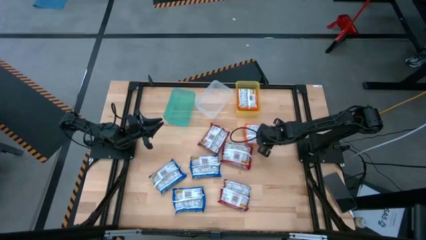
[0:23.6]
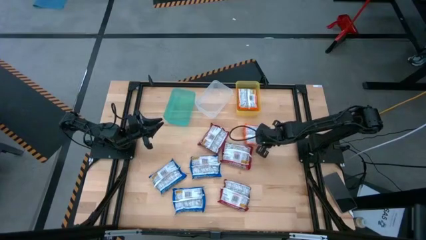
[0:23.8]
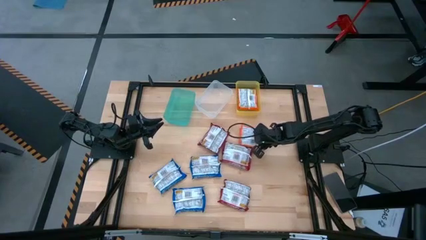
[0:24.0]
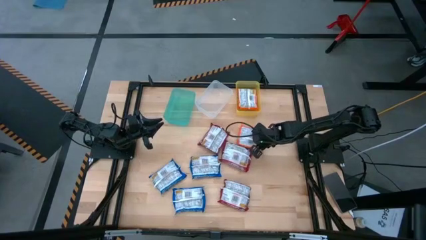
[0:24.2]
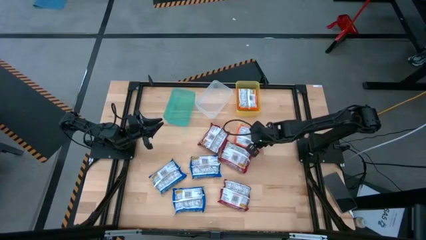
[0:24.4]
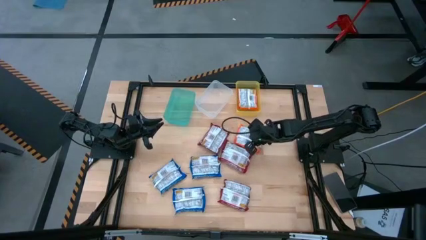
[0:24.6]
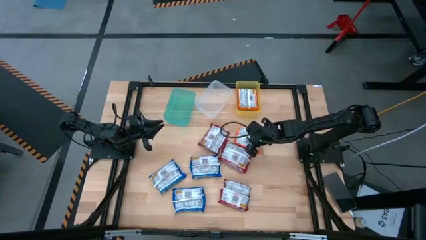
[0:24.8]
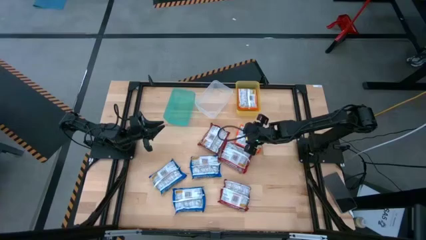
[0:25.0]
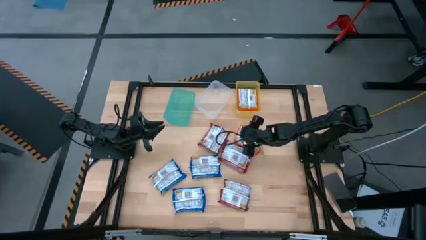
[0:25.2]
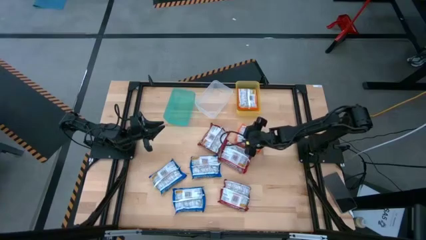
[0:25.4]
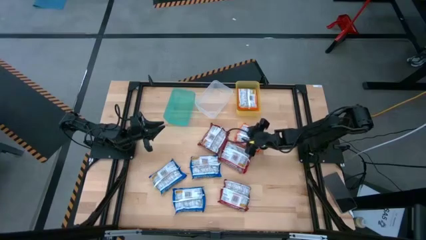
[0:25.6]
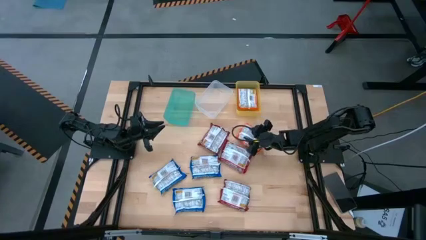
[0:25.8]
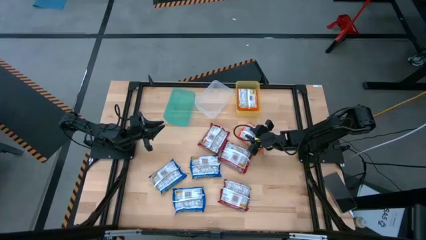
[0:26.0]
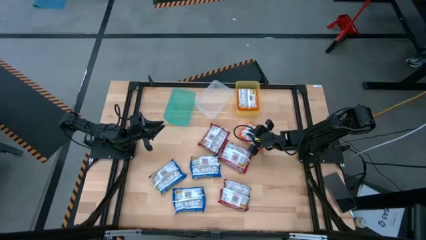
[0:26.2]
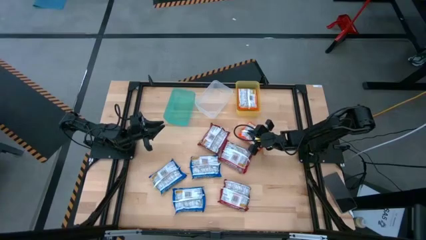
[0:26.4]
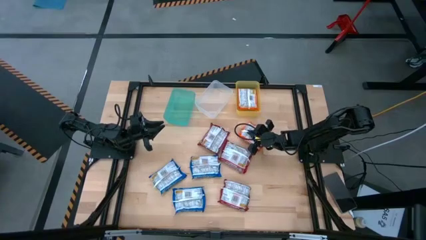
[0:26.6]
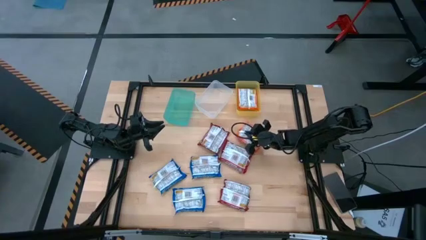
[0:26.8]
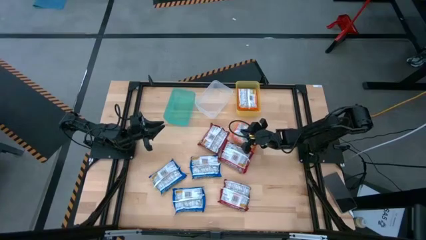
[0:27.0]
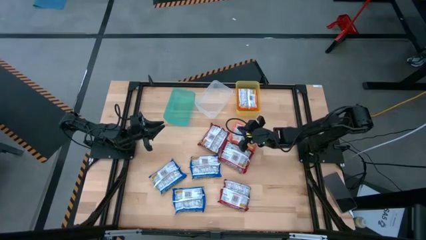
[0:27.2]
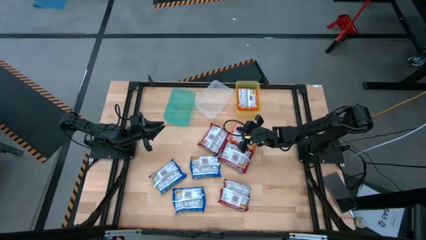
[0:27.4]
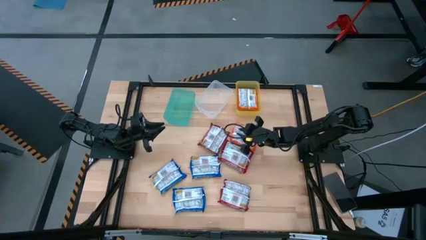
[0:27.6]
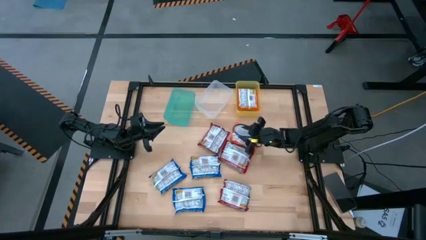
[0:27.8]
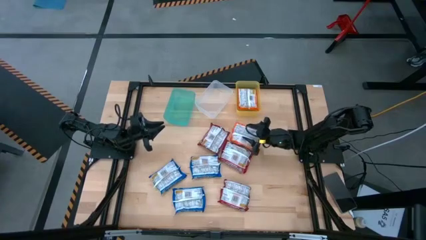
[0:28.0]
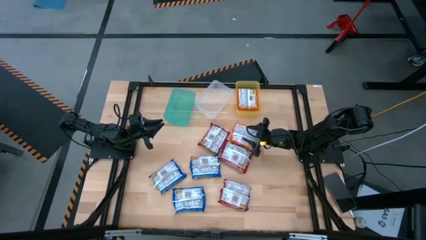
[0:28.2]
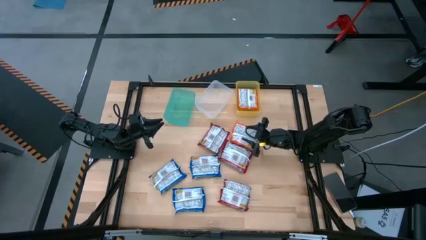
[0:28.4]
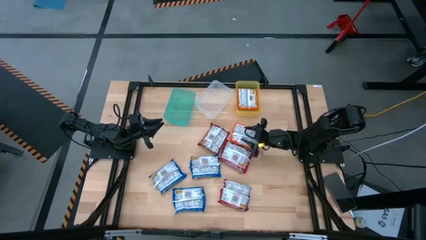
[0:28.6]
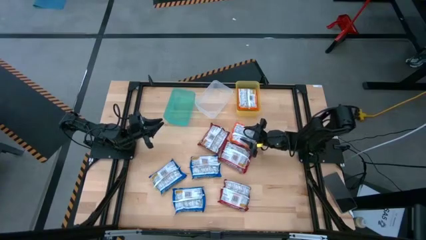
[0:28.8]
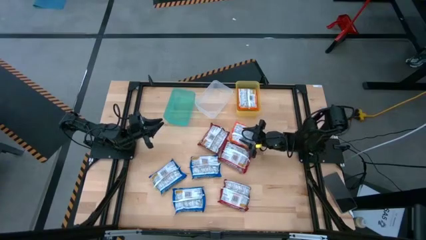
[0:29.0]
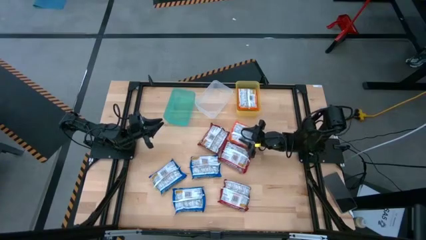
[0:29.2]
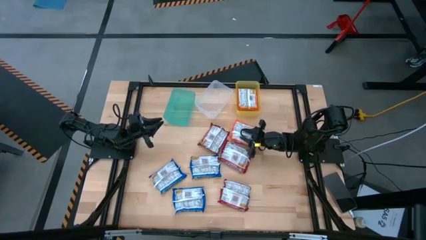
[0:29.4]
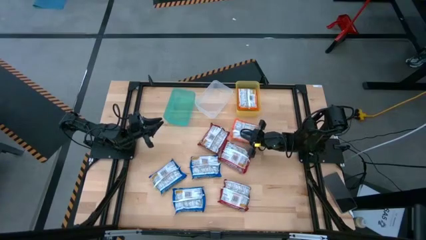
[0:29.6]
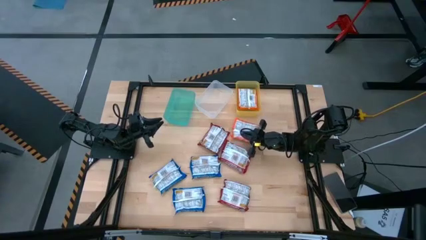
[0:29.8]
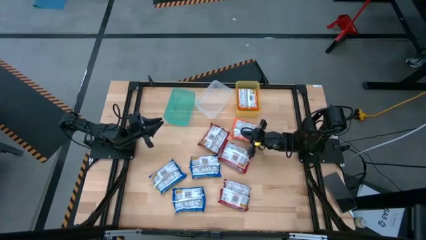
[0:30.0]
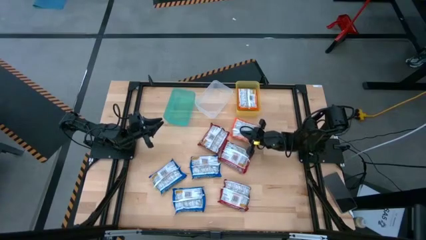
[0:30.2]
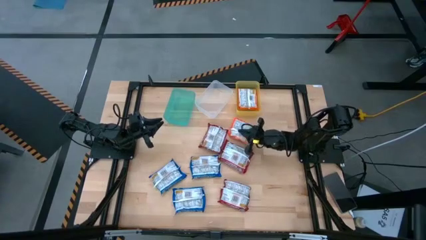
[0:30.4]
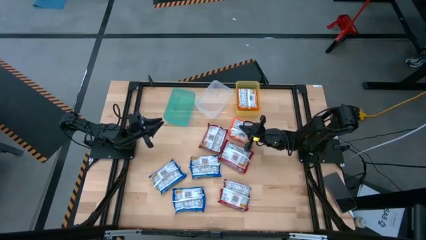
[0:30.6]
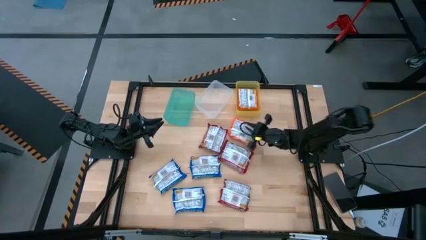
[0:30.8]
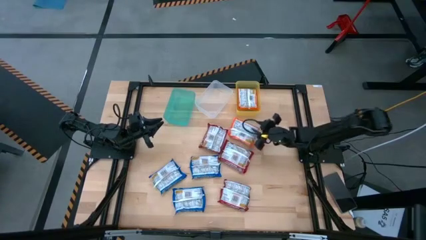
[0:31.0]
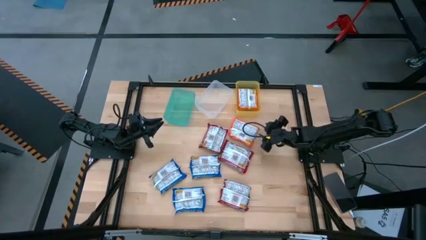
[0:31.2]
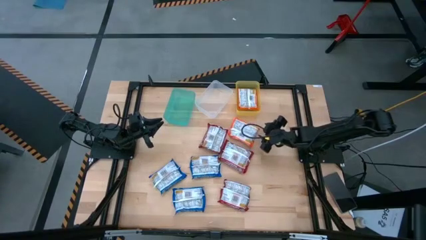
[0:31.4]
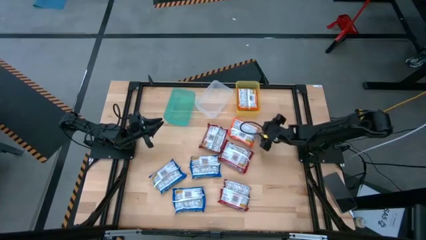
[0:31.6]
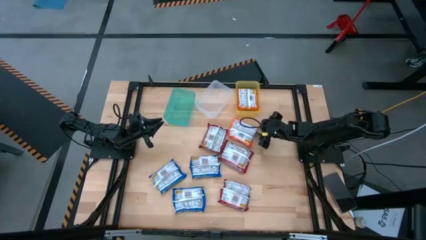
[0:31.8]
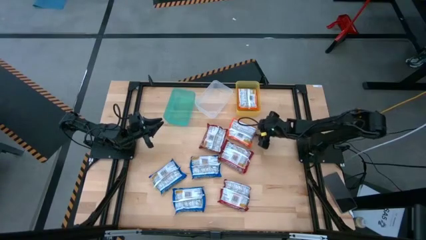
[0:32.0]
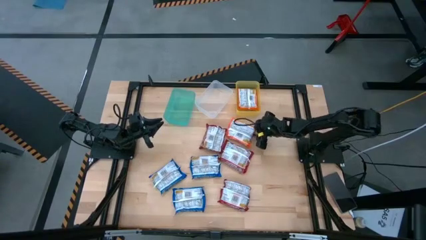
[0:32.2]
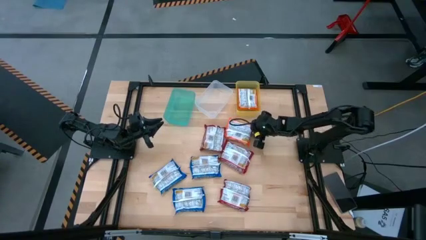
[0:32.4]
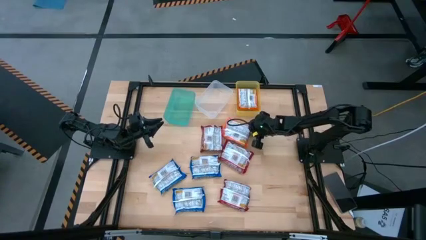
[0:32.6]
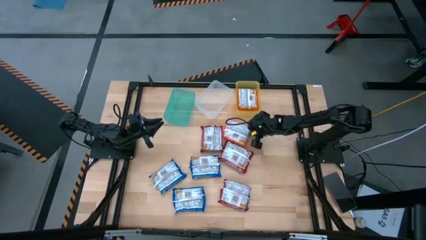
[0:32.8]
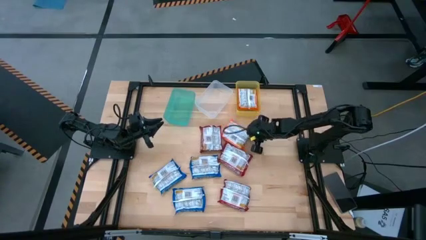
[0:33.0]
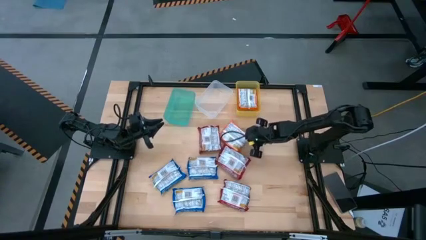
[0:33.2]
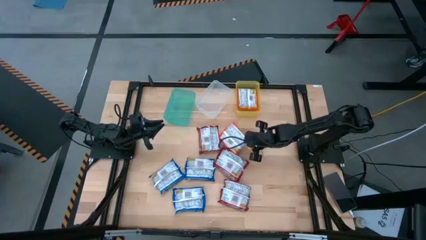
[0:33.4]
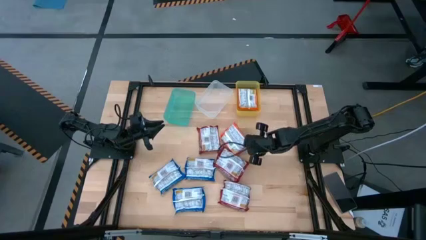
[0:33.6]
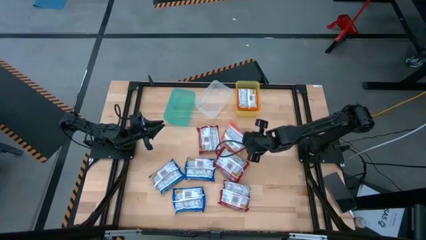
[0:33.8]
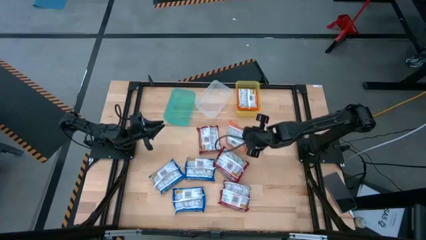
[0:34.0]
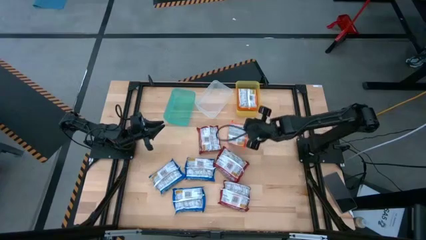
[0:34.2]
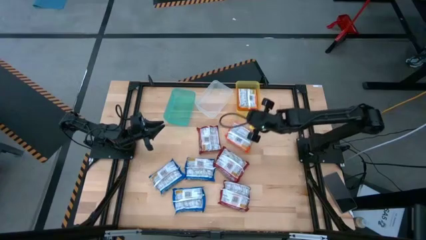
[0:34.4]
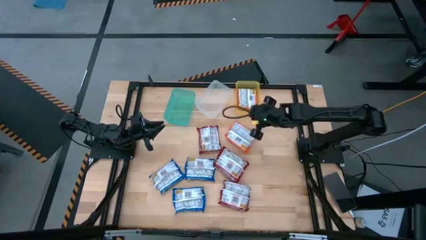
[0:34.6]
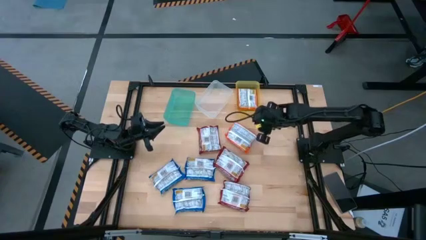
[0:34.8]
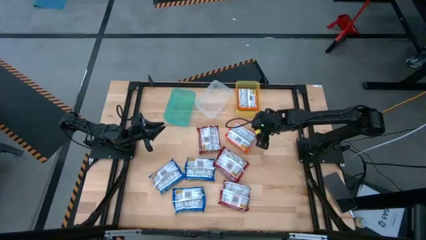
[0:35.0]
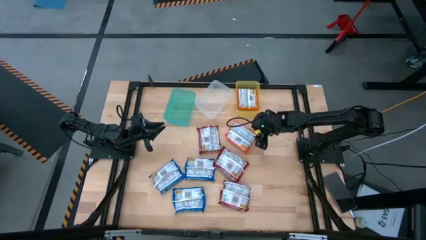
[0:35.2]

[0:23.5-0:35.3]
Task: Sort Maruchan noodles
Put the orange noodle pack into the yellow bin

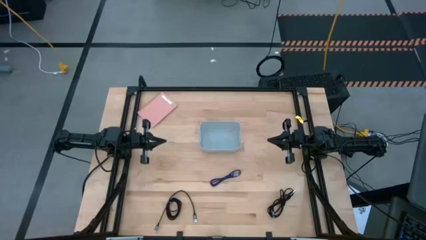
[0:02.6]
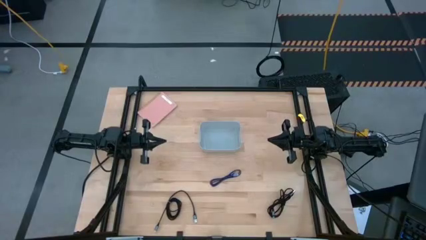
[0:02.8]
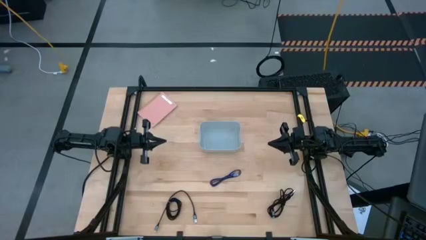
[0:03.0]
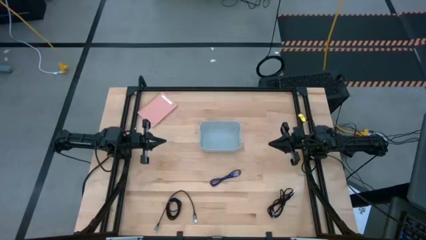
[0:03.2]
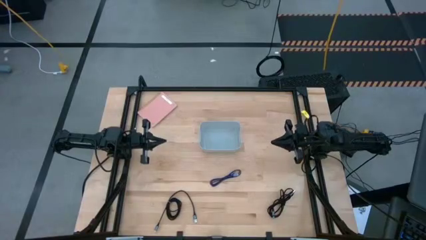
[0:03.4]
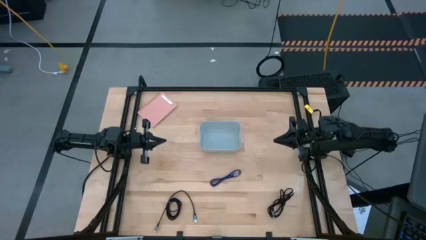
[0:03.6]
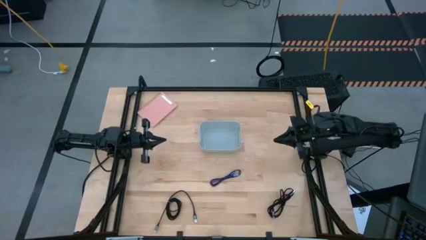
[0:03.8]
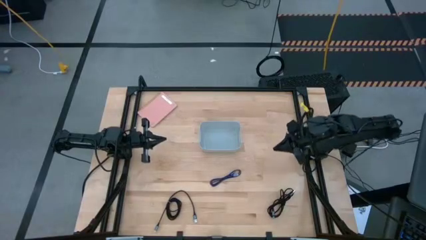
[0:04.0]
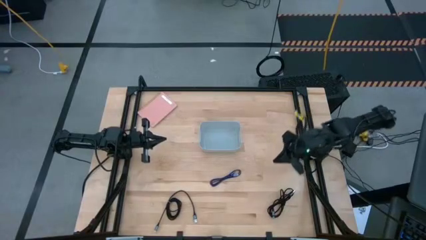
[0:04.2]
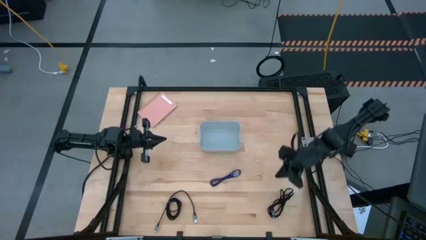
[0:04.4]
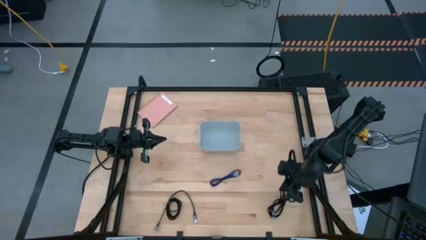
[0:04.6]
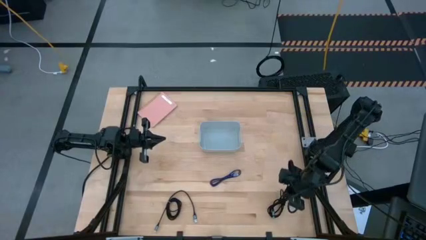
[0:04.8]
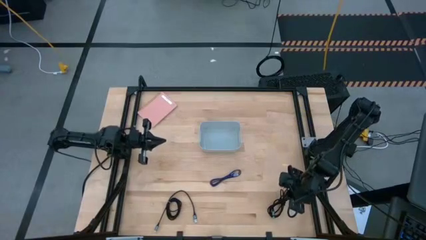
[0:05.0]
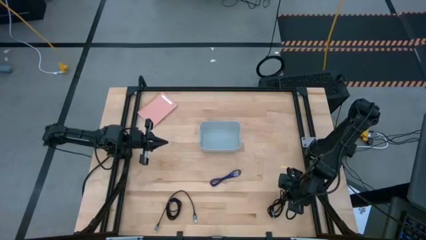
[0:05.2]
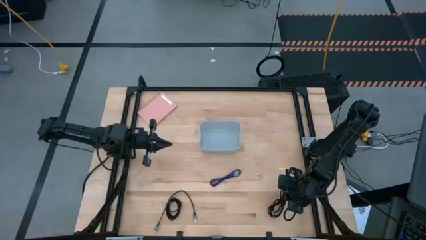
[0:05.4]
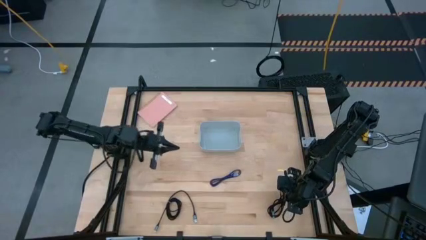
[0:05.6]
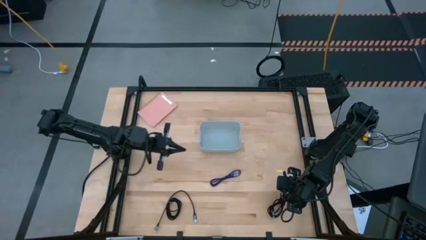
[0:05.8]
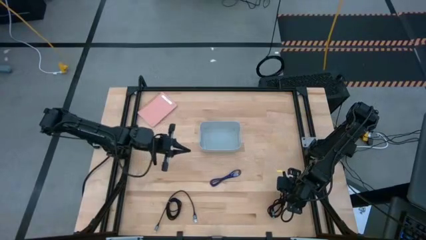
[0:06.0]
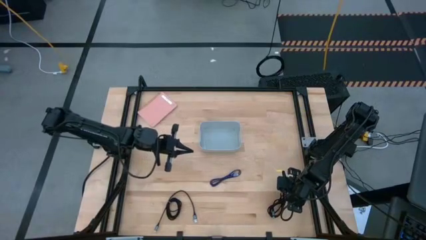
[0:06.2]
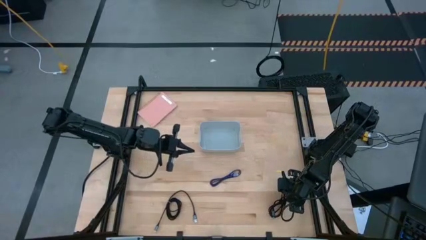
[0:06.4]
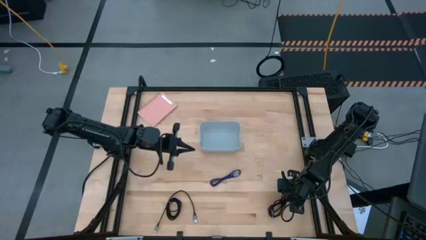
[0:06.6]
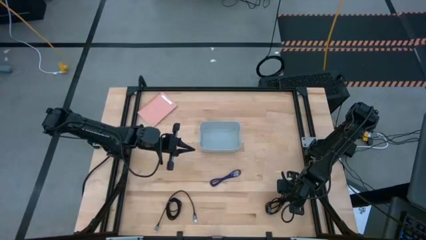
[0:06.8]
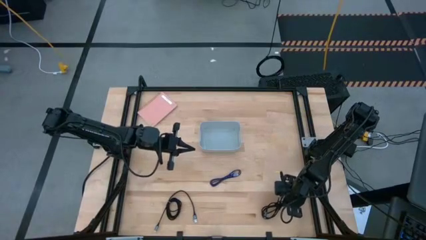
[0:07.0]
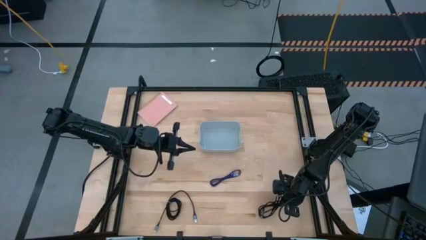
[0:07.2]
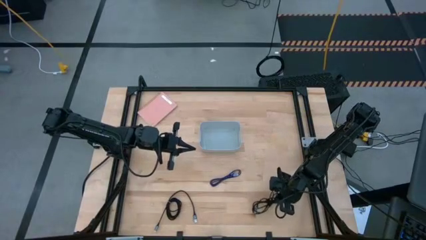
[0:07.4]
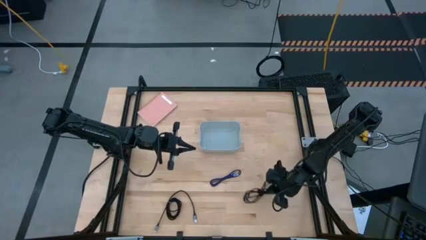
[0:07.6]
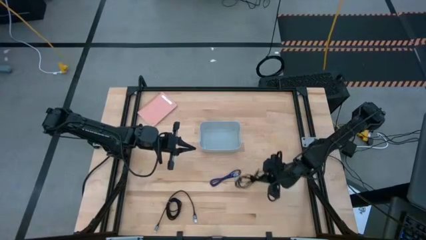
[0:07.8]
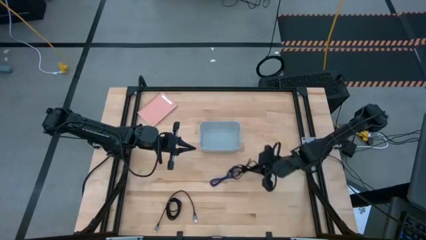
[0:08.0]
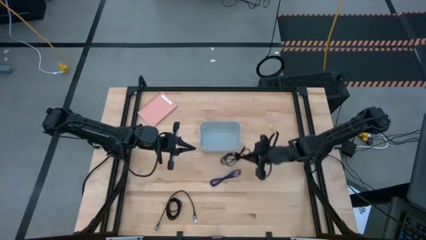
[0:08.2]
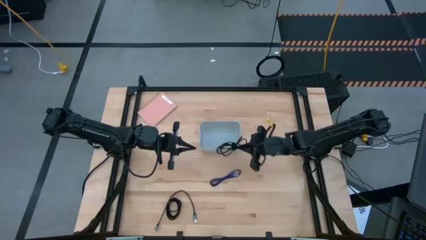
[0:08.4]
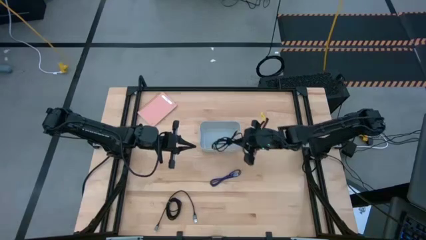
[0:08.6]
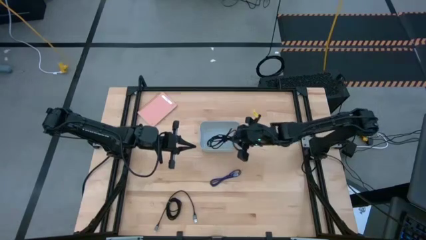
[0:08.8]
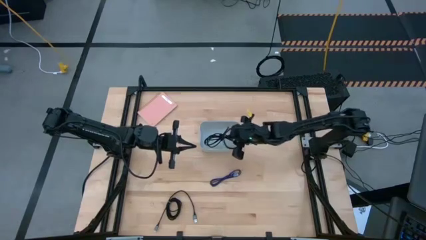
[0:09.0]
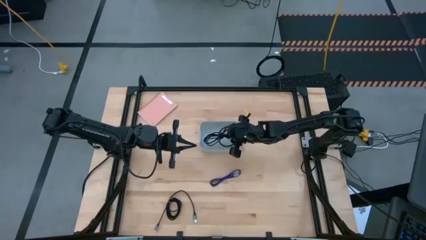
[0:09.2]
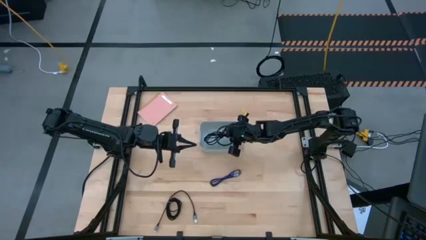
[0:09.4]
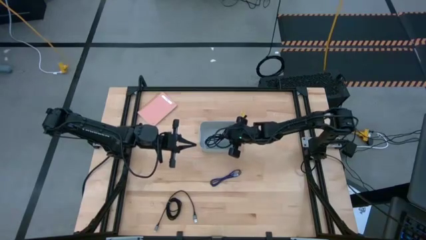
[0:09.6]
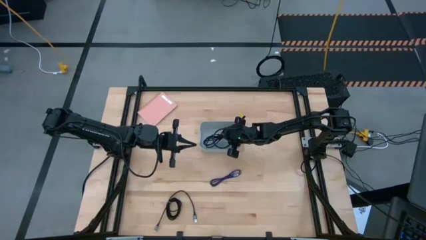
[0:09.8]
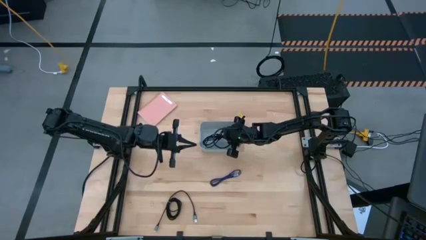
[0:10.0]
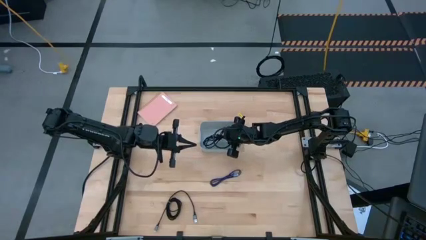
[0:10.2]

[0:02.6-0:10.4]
Task: Pick and place USB-C Cables
Put the black charger cable into the gray bin
